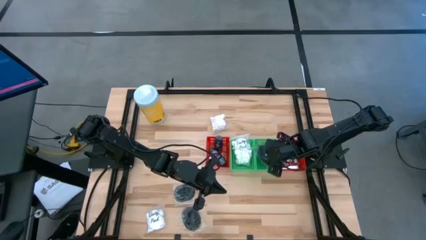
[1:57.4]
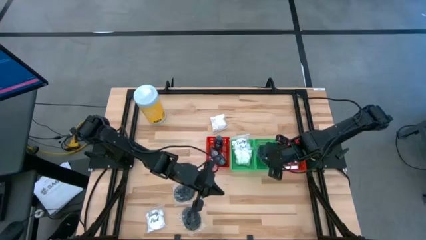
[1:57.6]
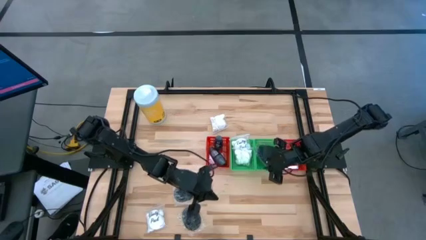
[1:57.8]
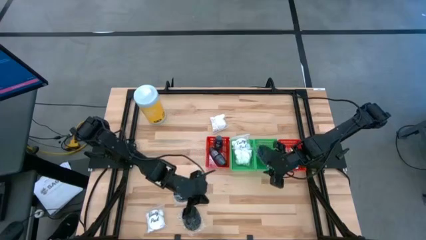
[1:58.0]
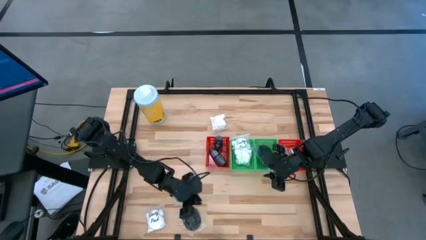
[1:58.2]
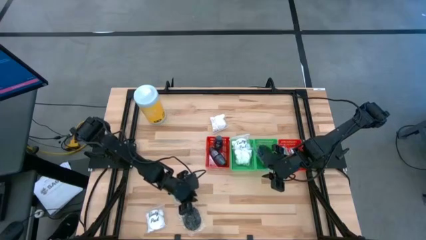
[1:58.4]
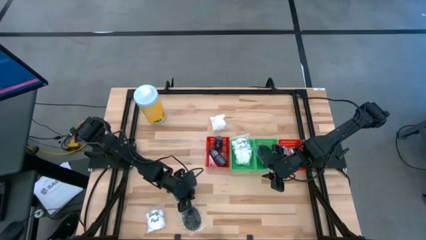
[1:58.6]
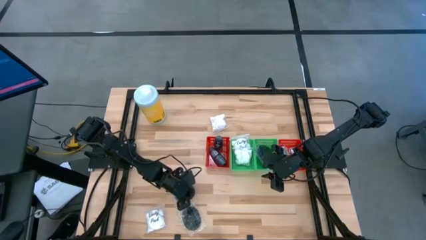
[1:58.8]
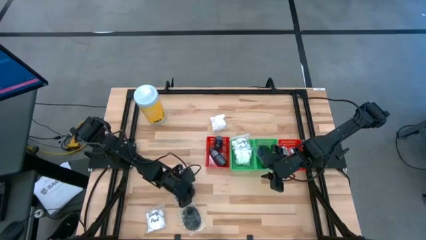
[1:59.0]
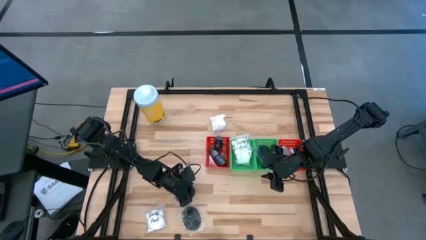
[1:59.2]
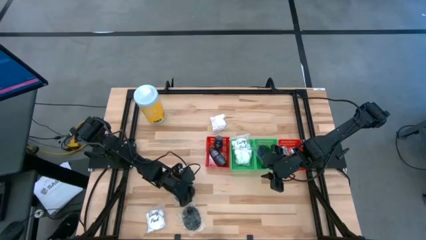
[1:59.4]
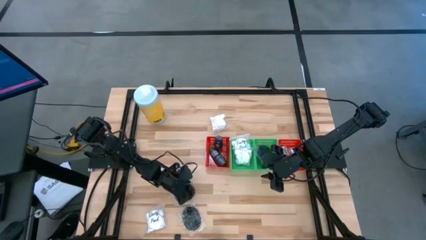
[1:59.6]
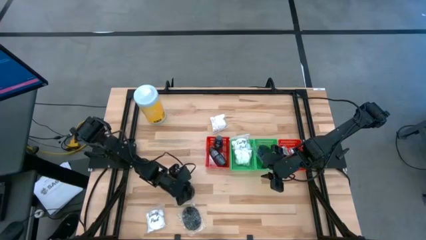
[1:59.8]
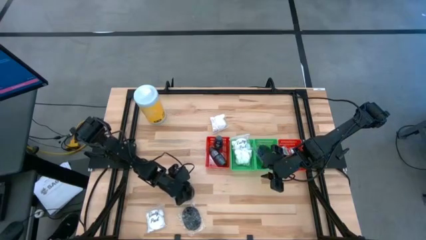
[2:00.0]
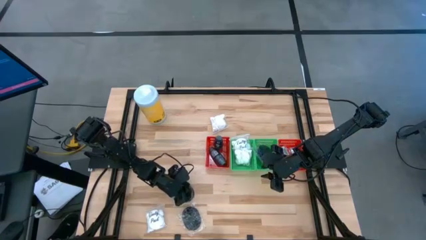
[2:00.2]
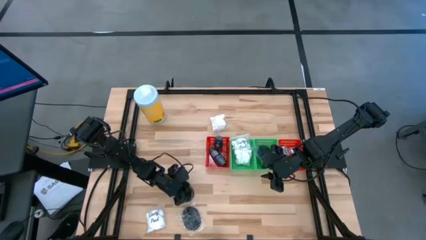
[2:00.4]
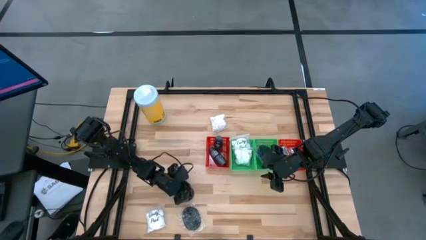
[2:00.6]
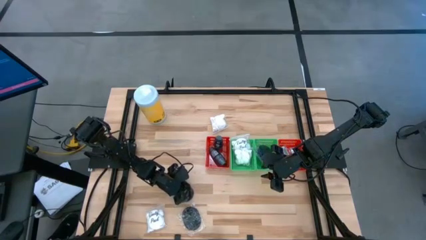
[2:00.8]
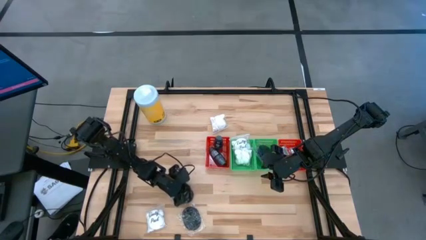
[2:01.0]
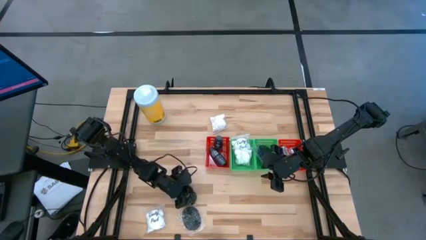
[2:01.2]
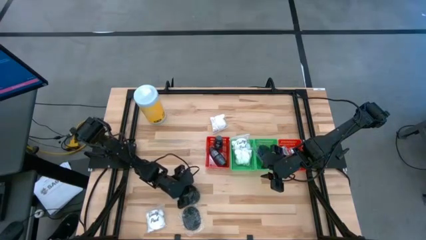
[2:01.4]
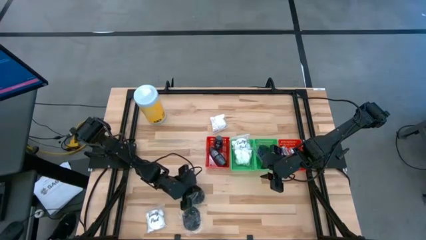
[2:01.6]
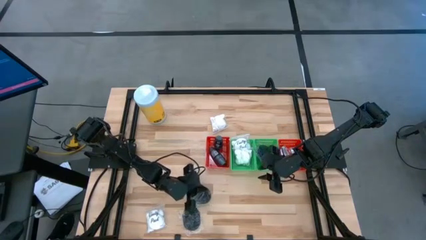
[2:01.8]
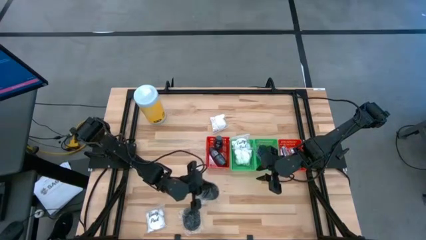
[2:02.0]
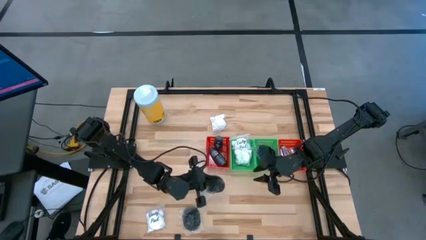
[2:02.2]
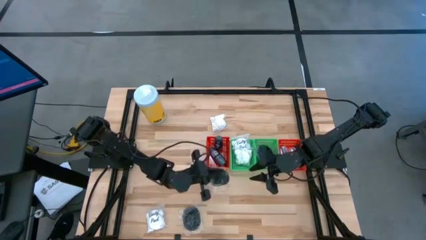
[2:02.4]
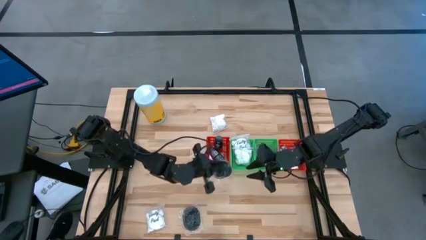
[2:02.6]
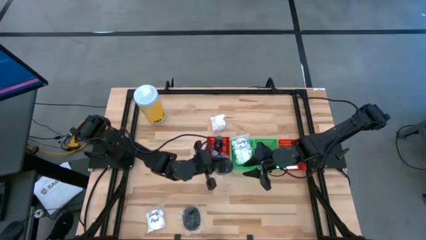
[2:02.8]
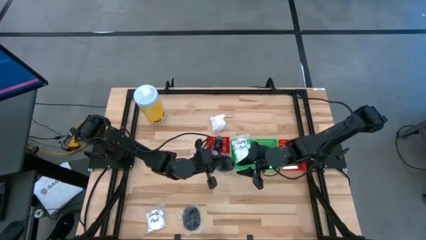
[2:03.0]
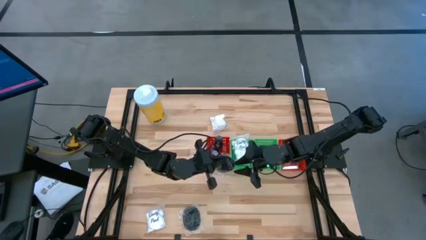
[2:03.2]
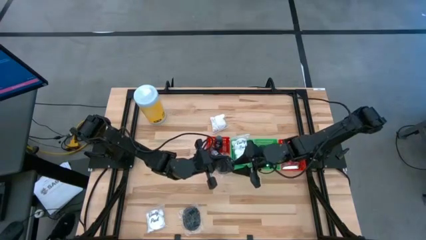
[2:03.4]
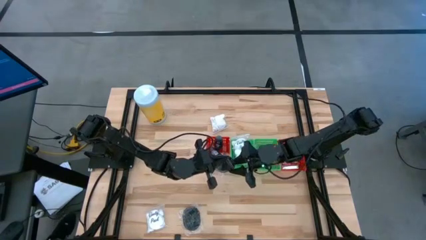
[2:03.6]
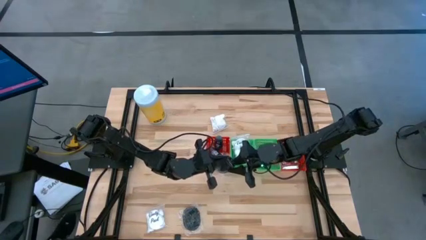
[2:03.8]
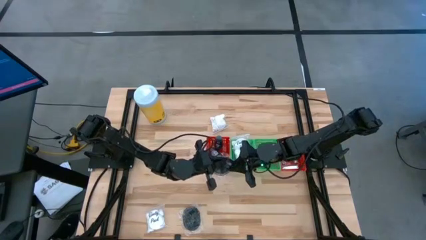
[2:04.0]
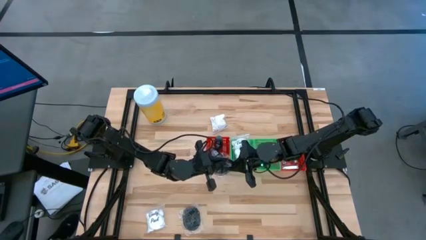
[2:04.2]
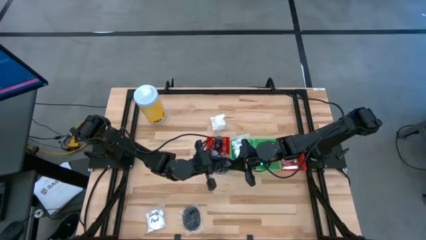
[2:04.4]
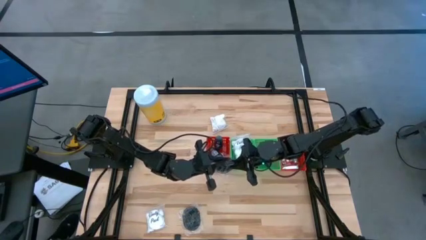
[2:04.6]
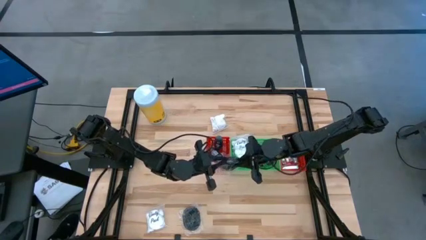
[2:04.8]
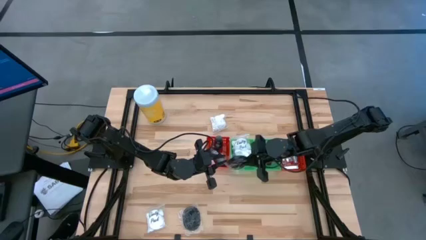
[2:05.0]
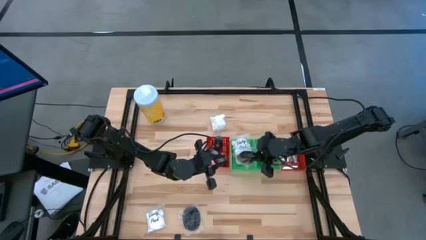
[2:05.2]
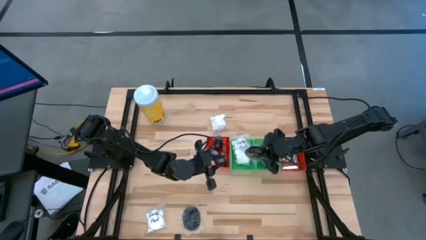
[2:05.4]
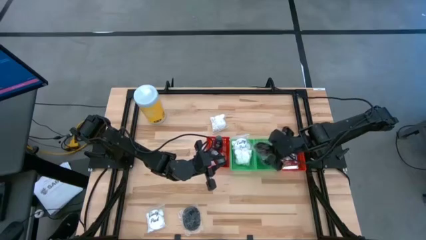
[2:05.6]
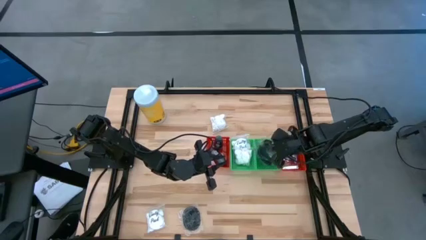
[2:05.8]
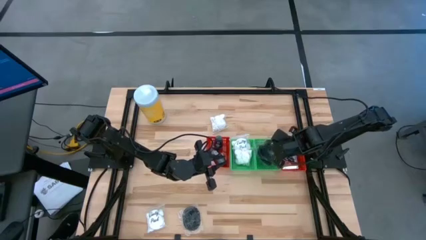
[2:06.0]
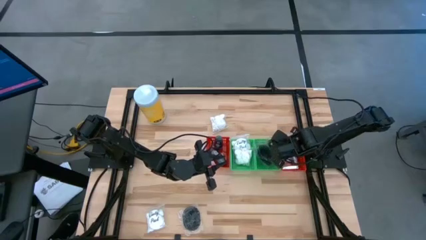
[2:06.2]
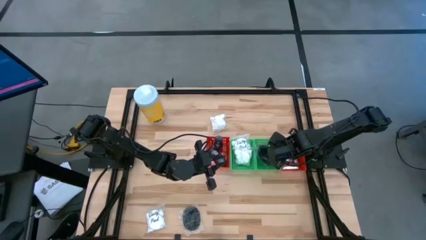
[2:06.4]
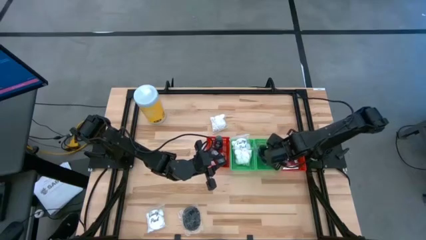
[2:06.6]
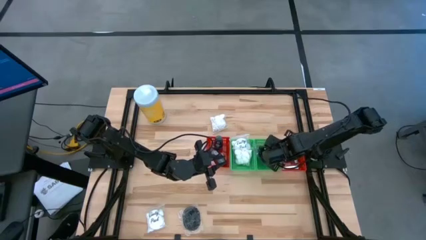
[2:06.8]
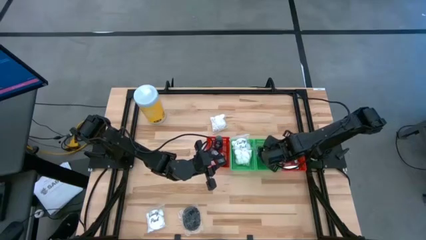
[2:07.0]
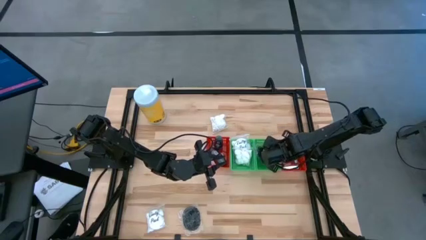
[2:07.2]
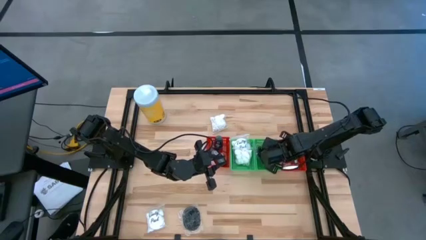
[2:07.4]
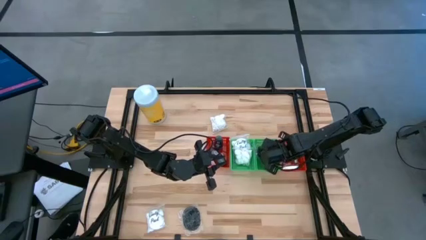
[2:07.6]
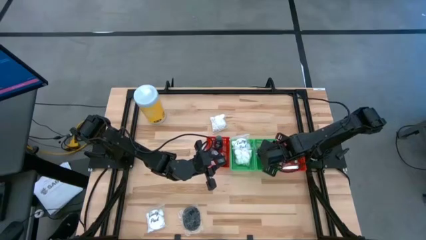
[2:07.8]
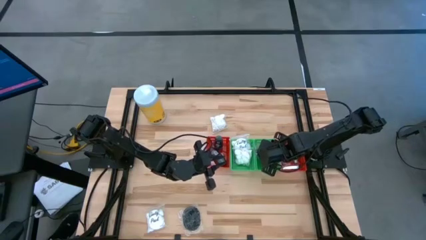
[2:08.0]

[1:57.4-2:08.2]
Task: Pick & Place Travel size toiletries
Put the black hairbrush into the right green bin

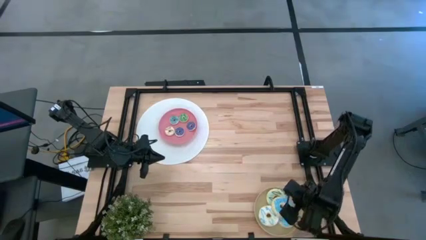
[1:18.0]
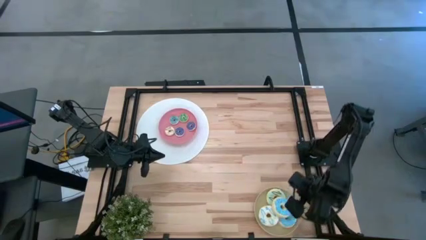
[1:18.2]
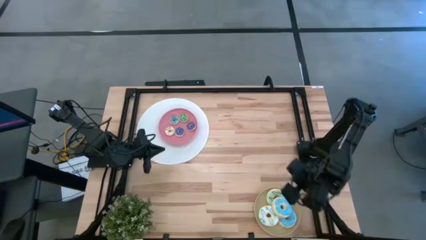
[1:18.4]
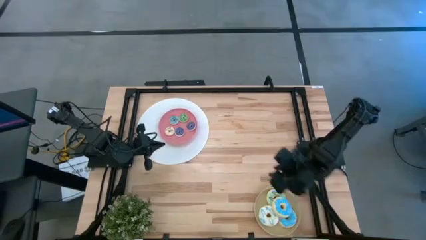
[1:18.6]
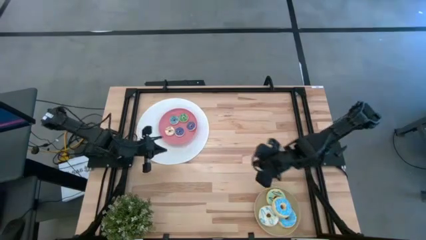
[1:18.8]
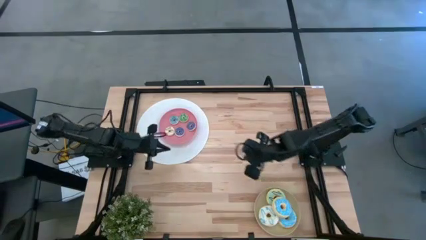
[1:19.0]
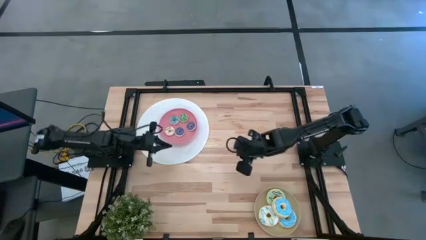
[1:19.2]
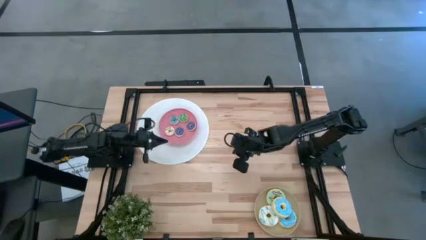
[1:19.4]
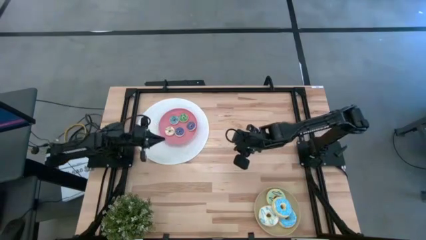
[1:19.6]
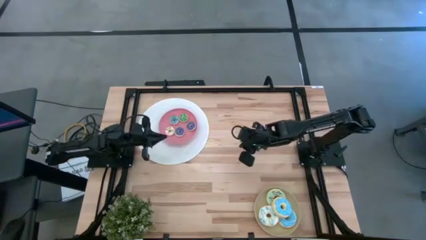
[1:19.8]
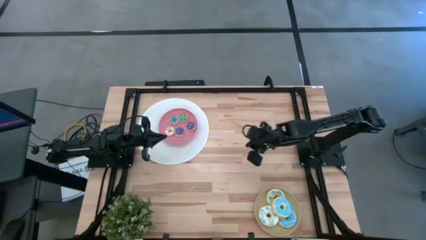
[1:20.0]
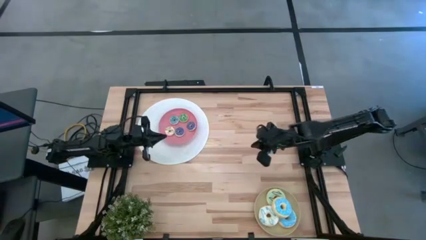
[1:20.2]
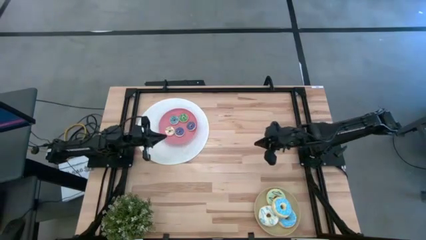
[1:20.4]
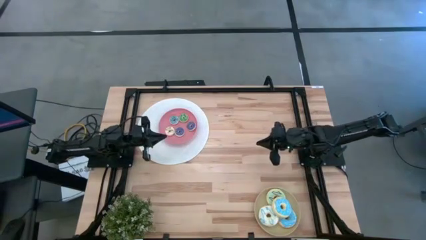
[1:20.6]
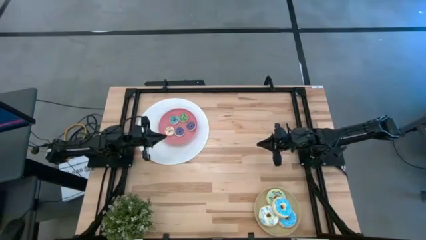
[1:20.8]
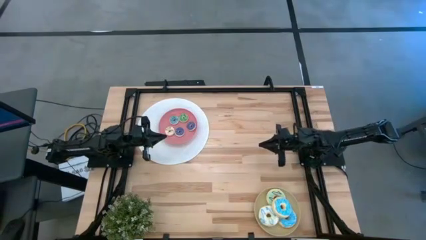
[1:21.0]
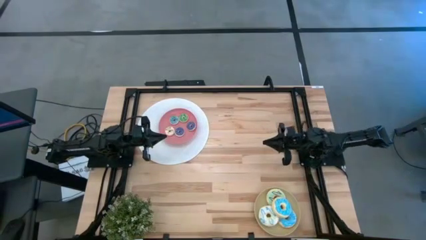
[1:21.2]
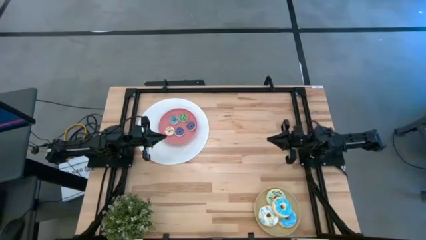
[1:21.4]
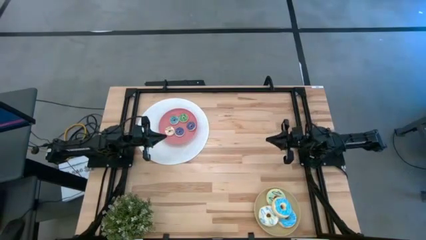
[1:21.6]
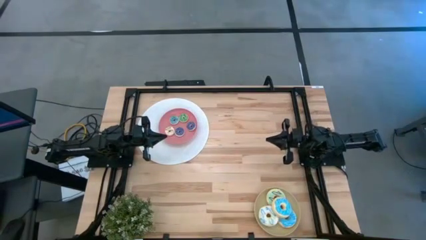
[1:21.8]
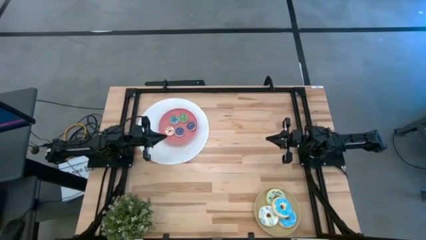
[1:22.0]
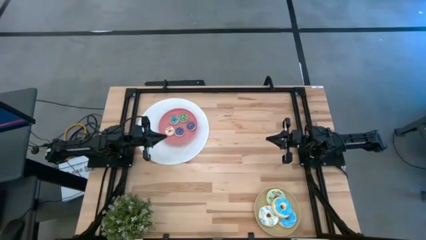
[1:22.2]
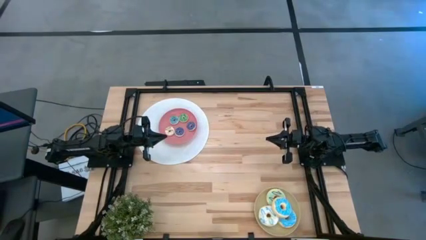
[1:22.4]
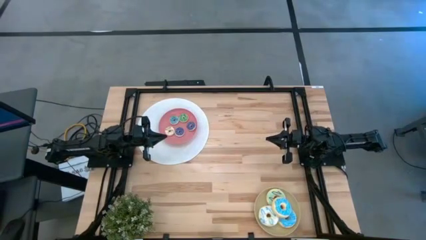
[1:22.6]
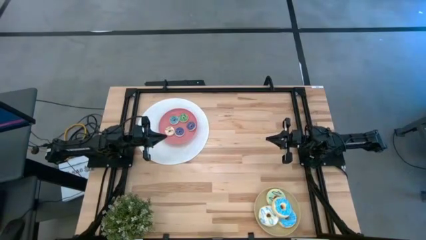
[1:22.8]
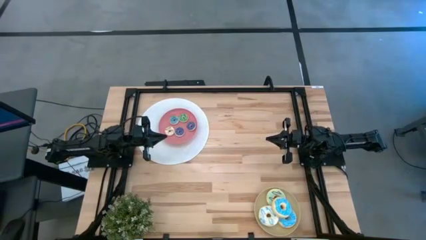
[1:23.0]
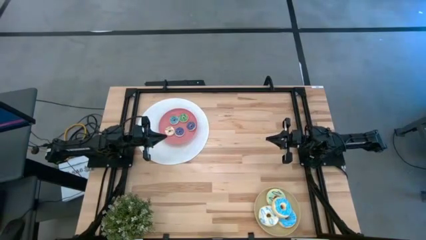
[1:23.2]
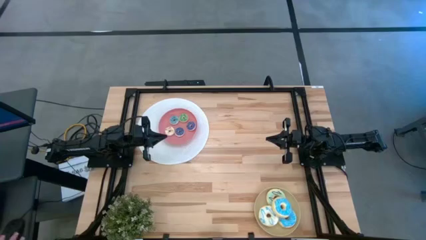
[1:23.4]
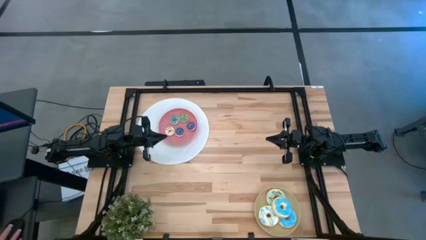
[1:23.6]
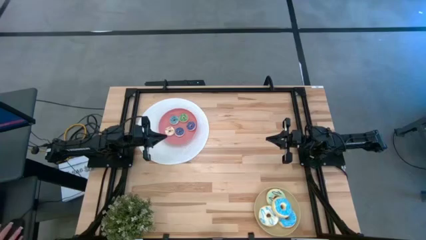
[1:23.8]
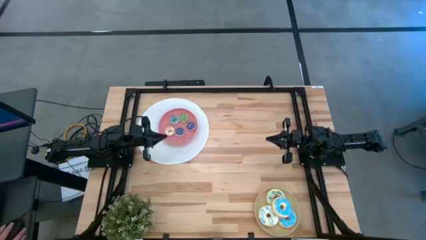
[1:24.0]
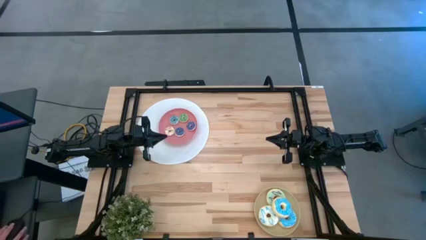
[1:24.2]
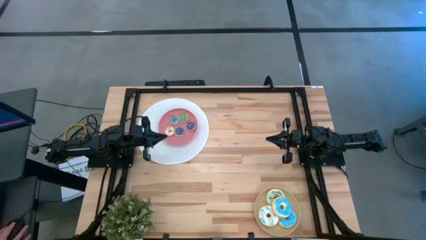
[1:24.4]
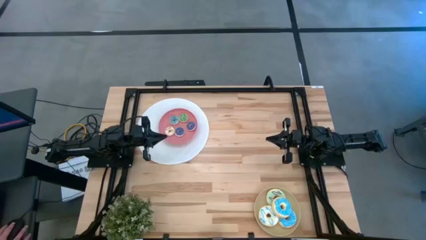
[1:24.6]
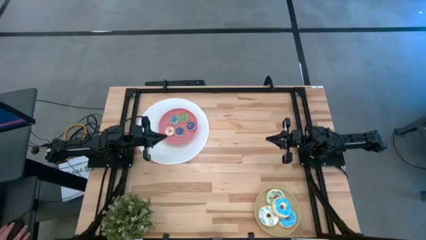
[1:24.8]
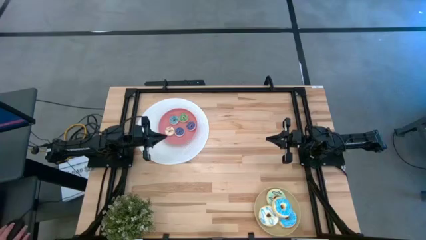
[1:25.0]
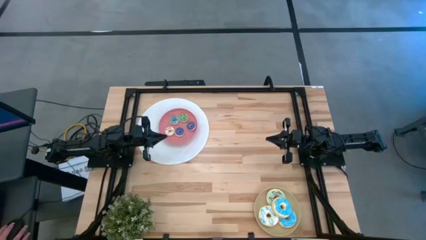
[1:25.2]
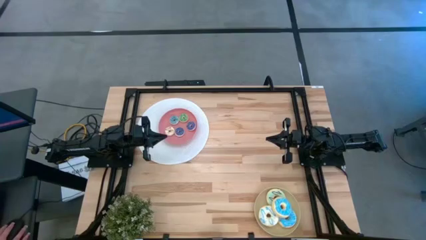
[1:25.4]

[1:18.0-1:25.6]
Task: Pick & Place donuts
Return to Home Position
